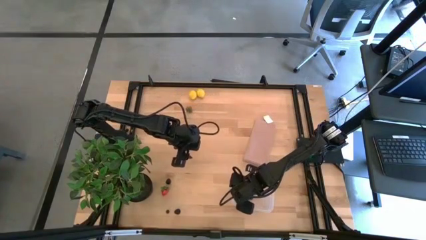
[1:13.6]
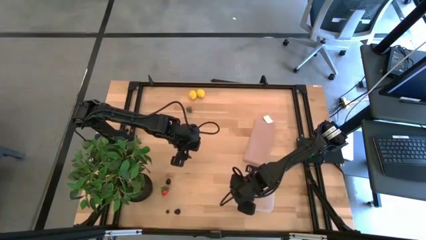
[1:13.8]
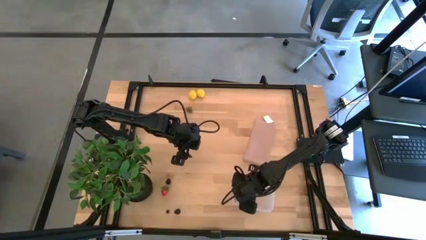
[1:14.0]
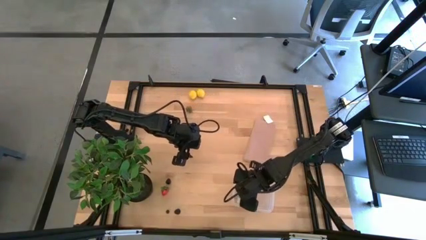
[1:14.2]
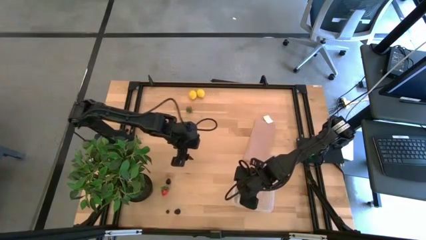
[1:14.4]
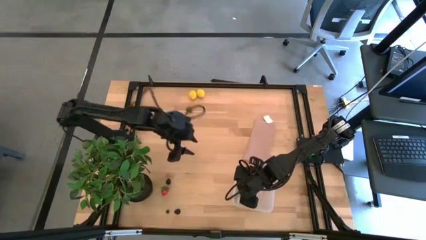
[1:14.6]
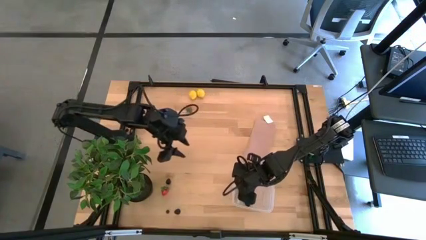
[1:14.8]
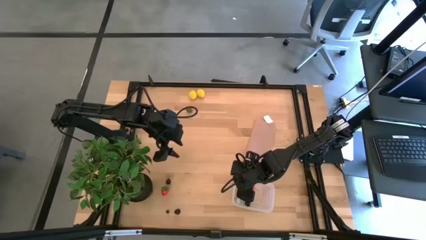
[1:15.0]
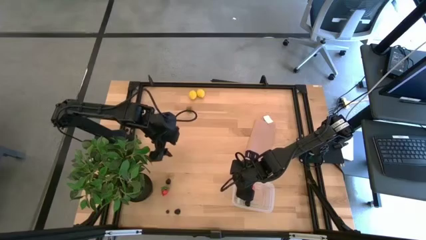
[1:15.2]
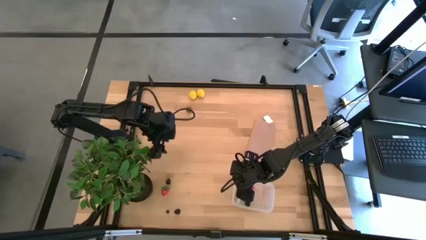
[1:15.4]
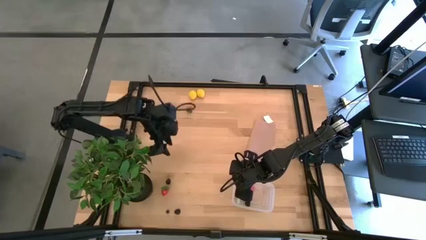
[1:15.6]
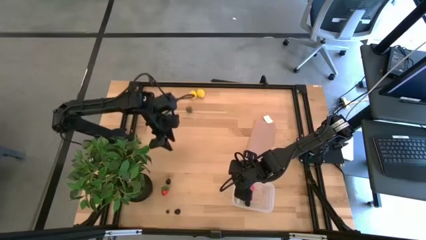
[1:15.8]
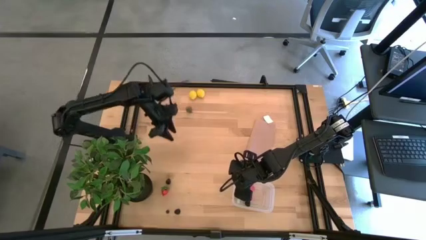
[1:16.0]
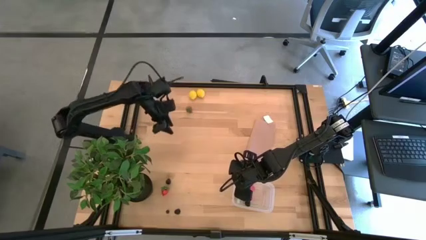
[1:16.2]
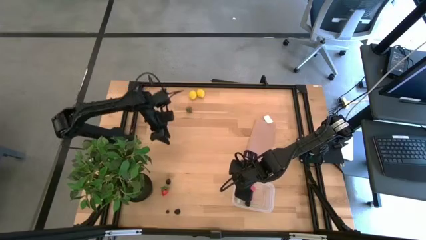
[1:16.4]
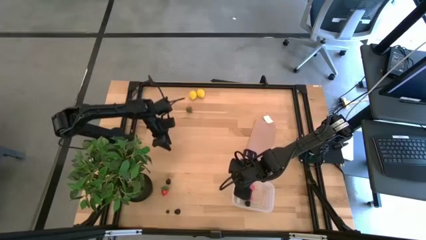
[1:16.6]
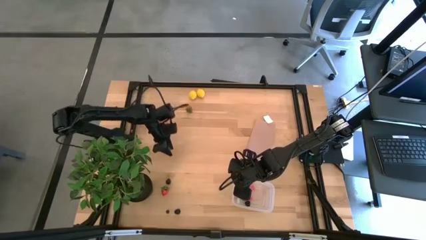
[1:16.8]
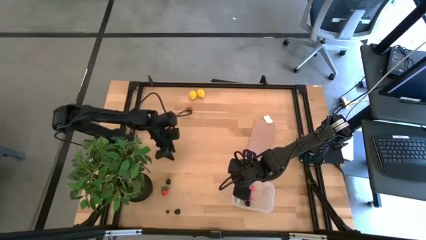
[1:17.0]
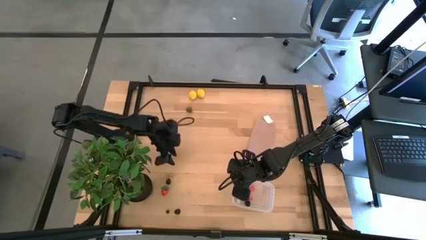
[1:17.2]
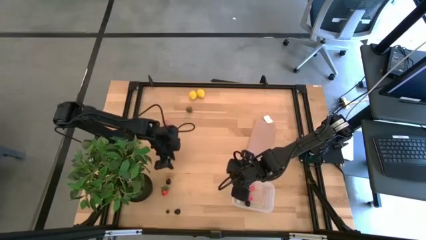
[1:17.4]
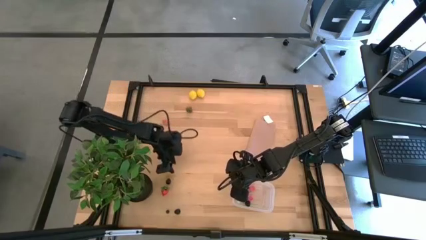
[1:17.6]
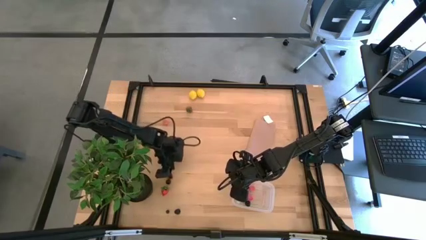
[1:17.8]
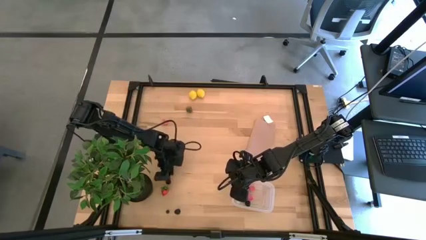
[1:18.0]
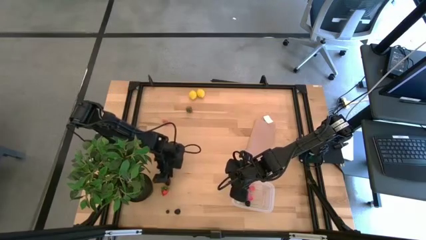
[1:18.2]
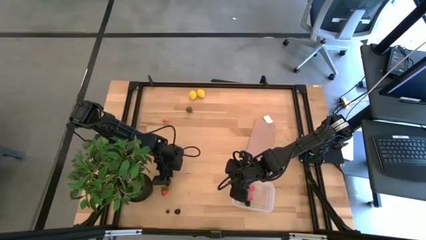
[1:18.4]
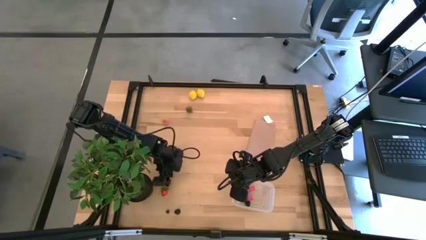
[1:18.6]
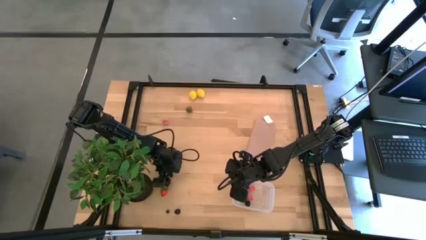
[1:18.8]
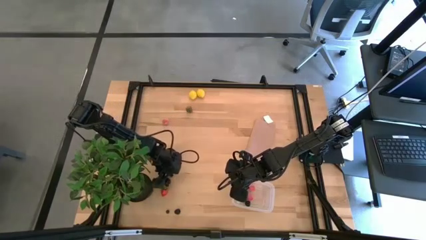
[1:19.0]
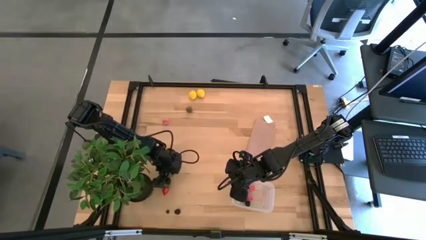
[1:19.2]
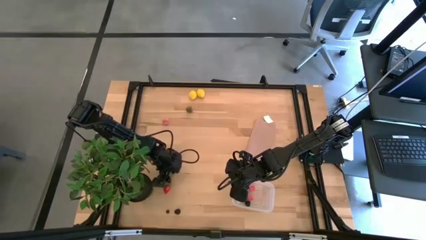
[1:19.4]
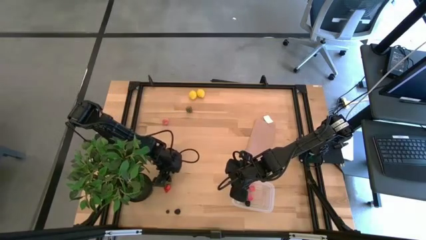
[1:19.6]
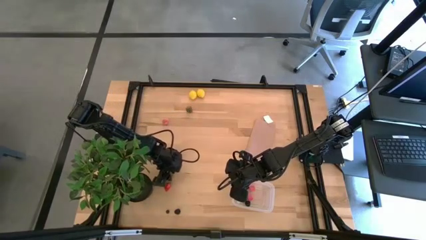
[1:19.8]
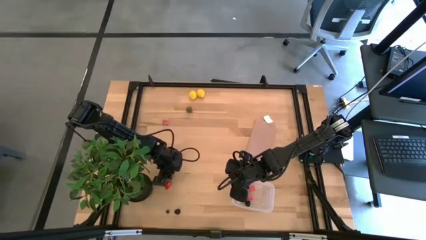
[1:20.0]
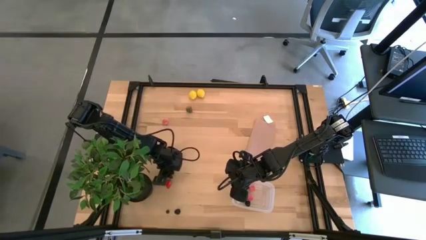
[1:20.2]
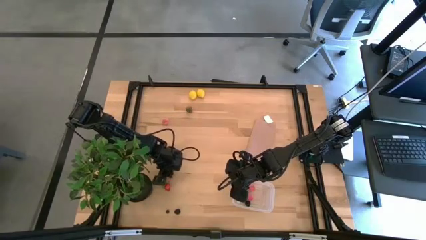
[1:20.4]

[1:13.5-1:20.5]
Task: Pick and placing Produce into tupperware
Put the blackberry into the transparent container

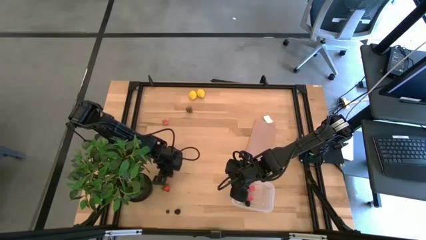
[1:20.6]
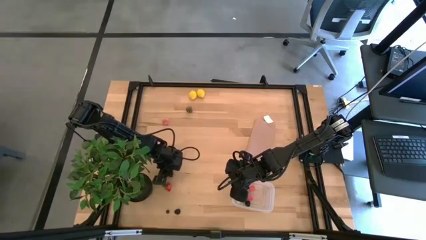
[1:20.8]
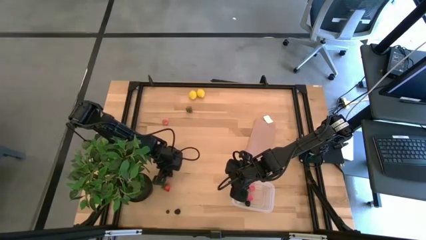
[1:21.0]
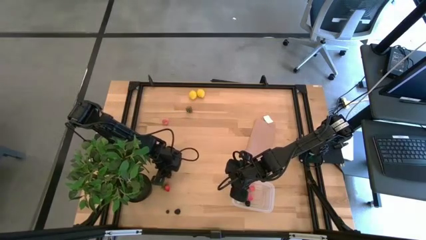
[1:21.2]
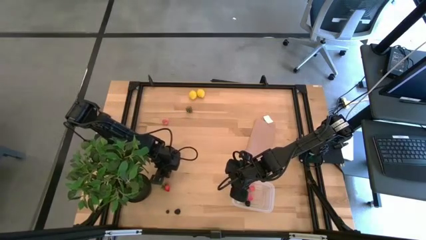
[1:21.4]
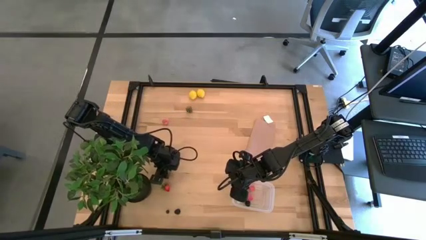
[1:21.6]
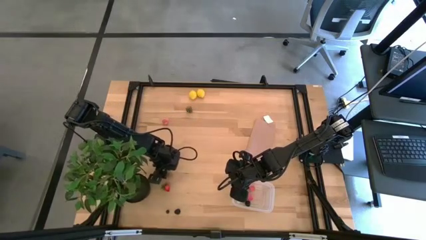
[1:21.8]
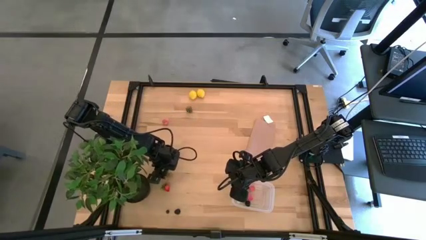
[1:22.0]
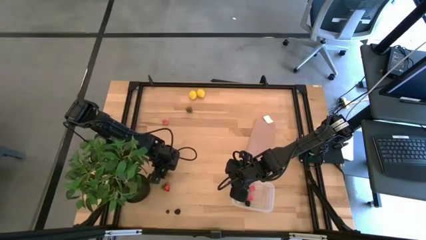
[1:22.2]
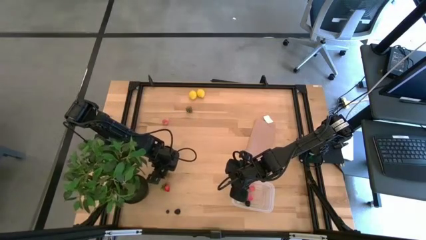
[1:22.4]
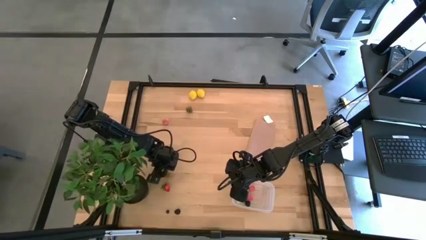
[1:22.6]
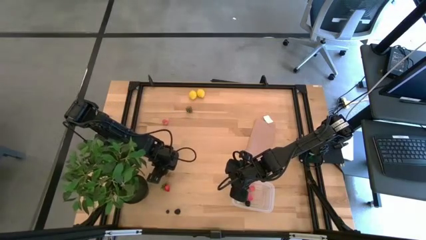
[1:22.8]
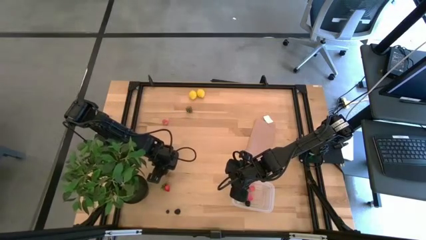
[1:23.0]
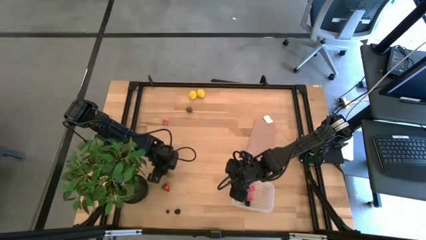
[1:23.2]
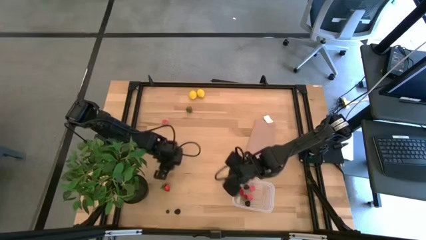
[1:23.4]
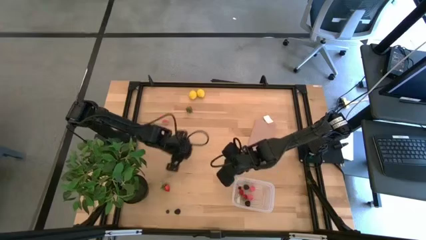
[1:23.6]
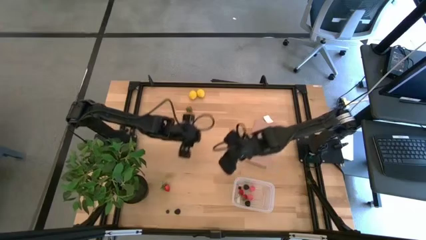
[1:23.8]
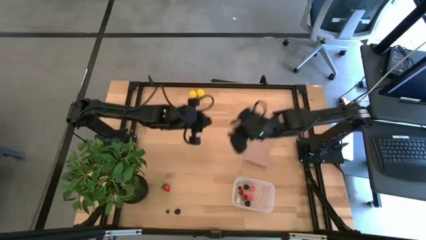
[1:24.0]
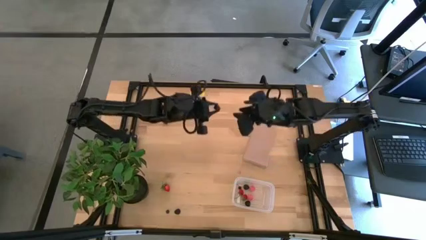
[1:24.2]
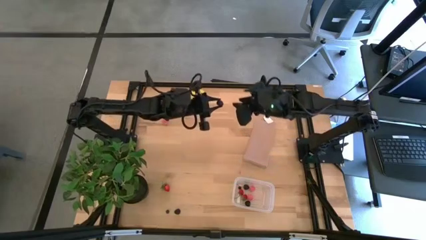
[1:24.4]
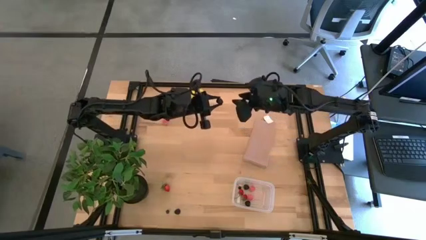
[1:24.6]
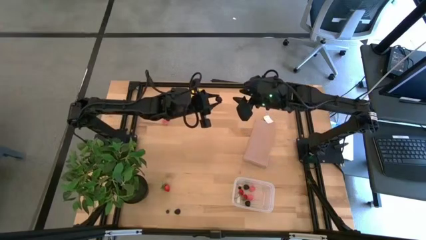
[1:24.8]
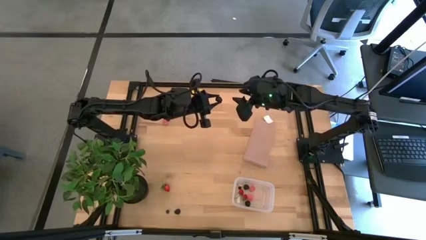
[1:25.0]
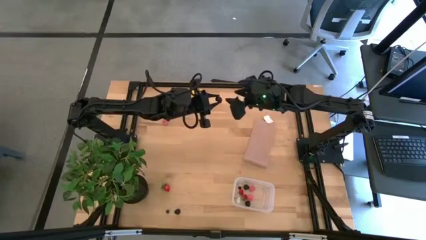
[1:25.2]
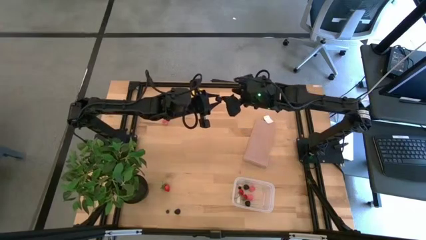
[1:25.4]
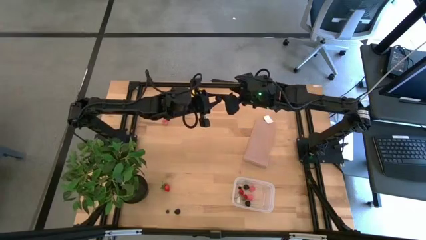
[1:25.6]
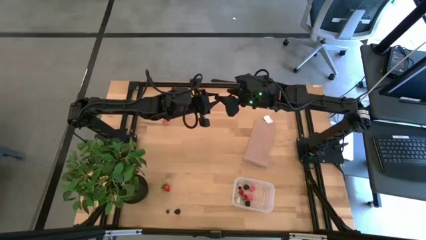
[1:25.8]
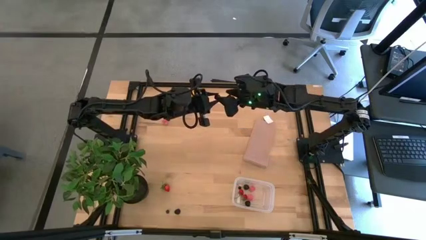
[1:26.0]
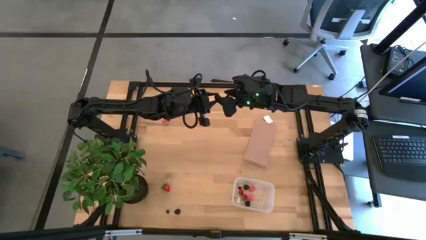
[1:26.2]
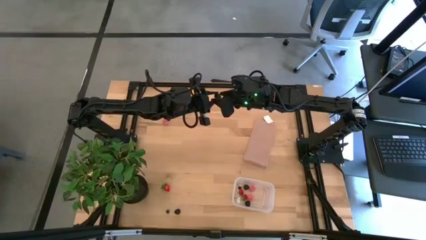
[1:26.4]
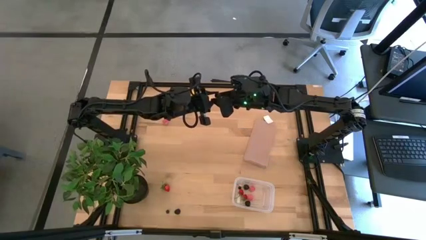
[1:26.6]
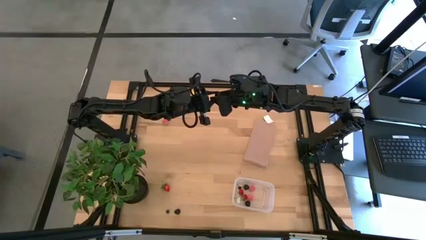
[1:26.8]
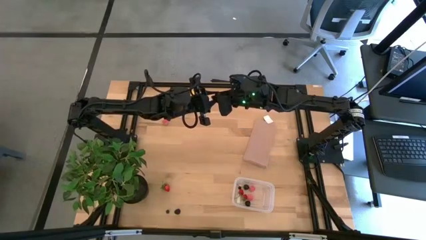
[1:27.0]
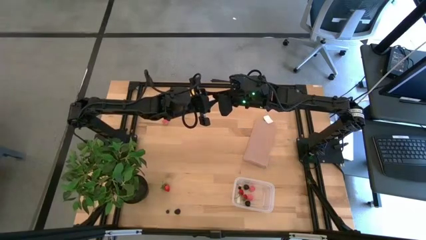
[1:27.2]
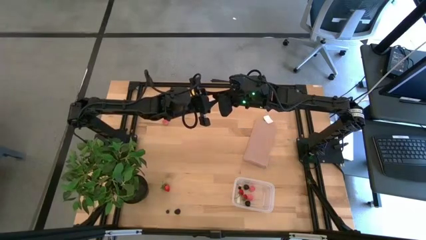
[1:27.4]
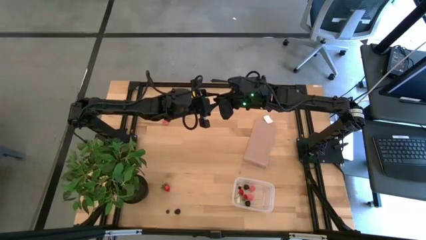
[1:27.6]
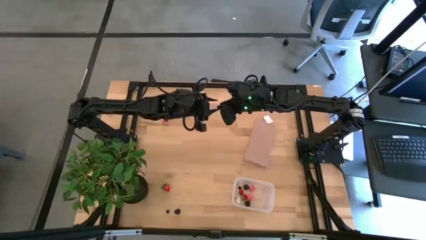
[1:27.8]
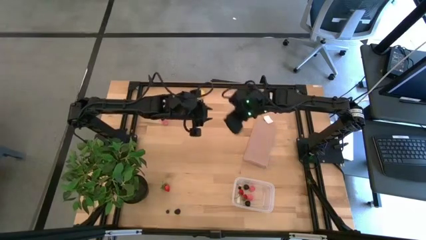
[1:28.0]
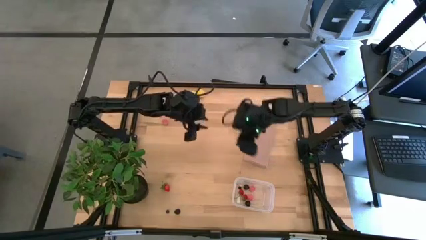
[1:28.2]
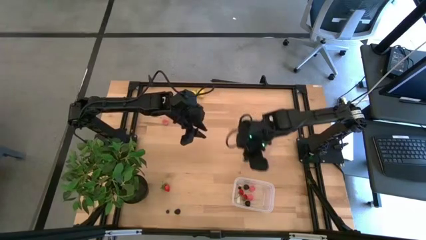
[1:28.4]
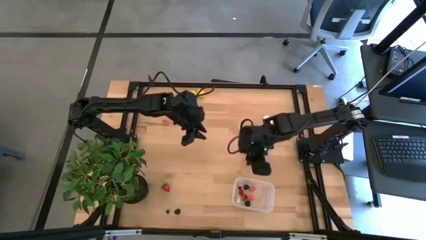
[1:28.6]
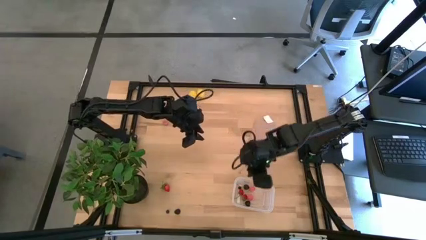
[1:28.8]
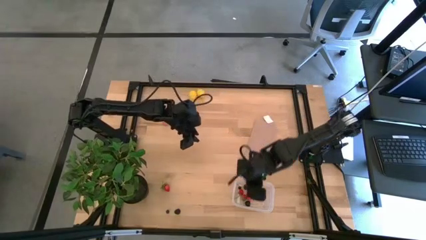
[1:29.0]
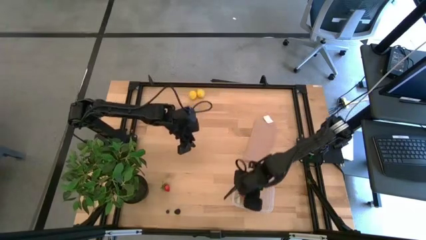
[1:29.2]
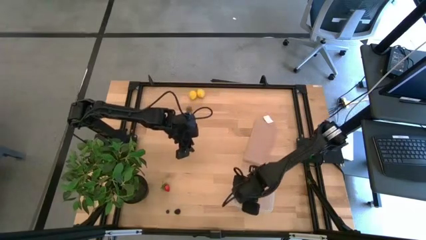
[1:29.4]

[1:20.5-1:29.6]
Put the blackberry into the transparent container
